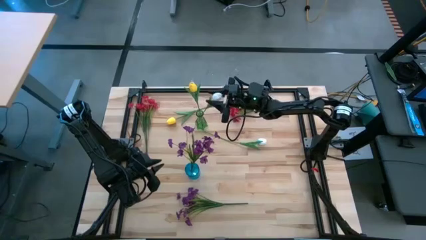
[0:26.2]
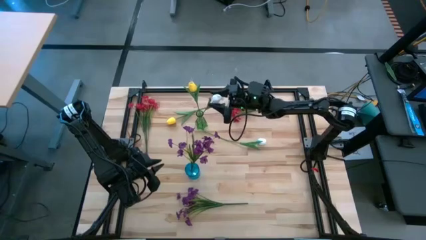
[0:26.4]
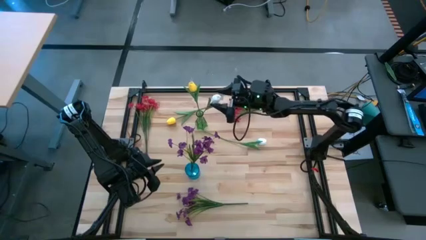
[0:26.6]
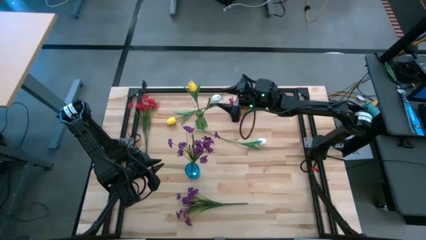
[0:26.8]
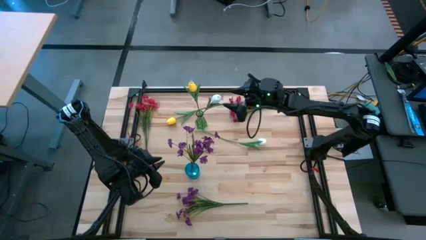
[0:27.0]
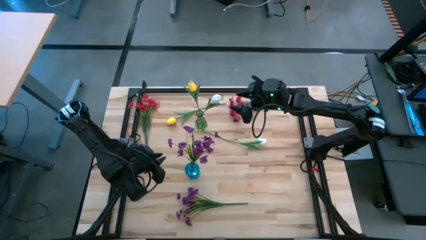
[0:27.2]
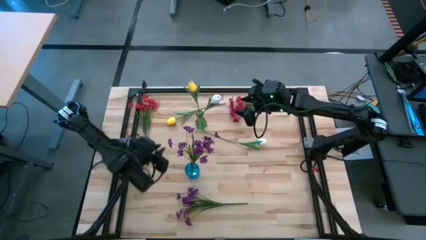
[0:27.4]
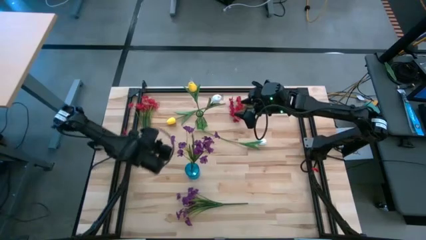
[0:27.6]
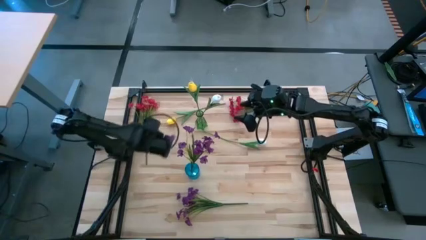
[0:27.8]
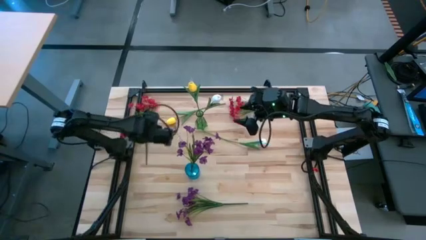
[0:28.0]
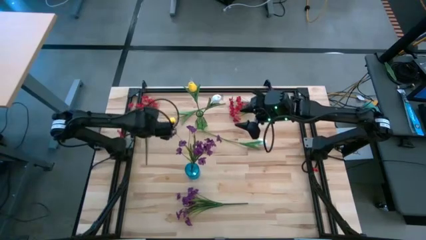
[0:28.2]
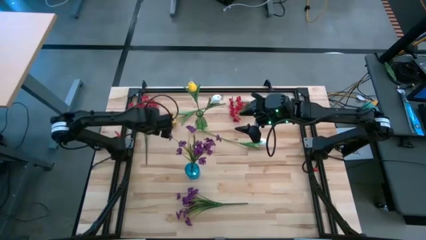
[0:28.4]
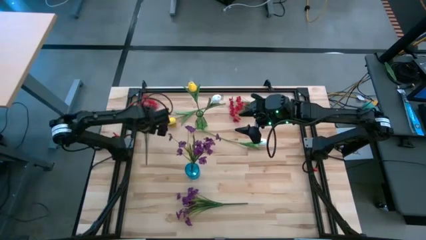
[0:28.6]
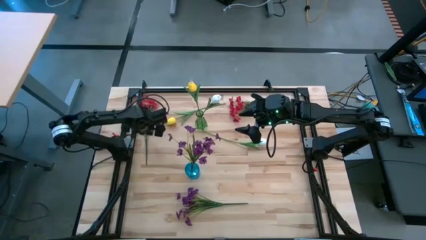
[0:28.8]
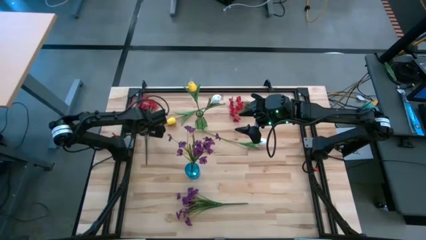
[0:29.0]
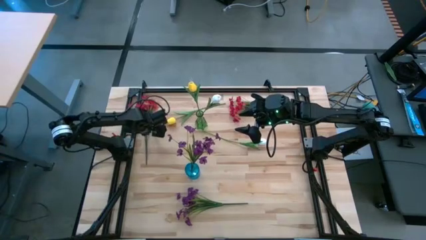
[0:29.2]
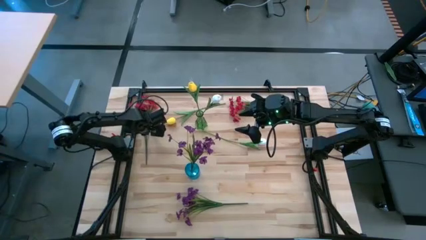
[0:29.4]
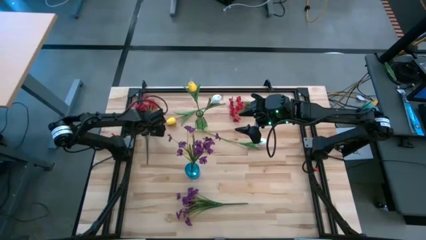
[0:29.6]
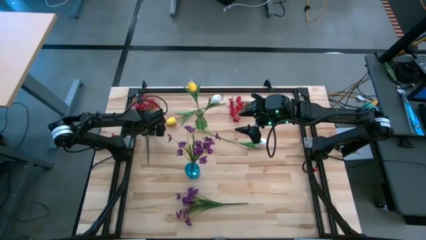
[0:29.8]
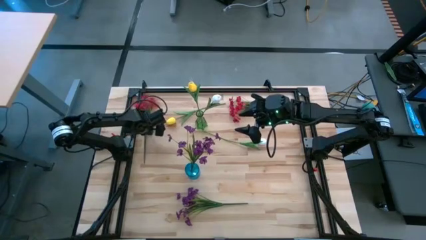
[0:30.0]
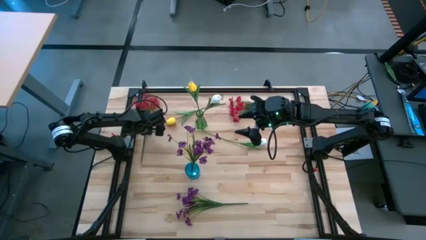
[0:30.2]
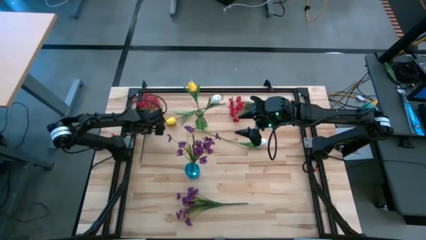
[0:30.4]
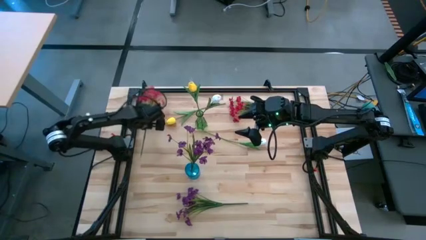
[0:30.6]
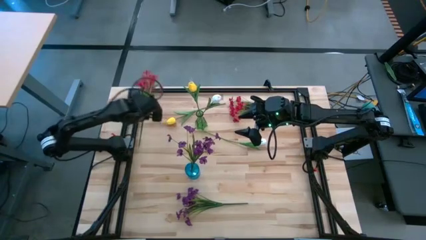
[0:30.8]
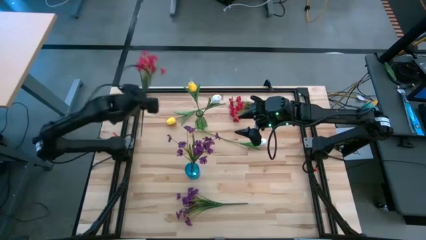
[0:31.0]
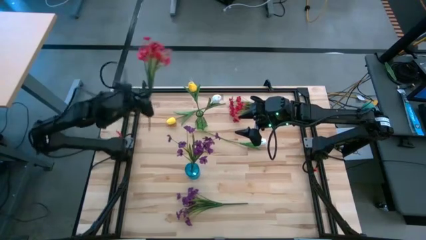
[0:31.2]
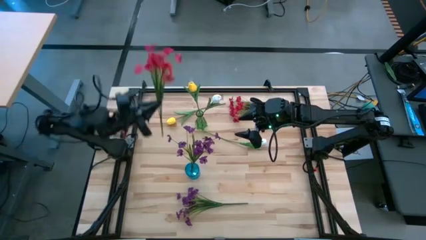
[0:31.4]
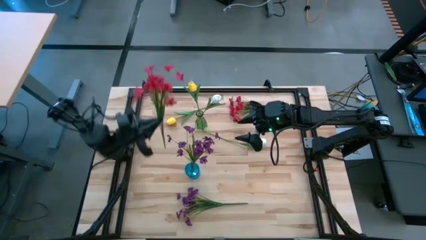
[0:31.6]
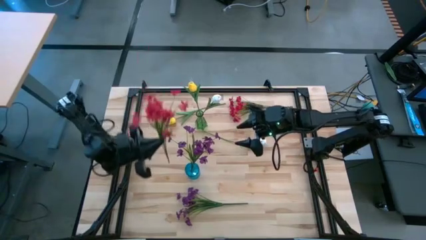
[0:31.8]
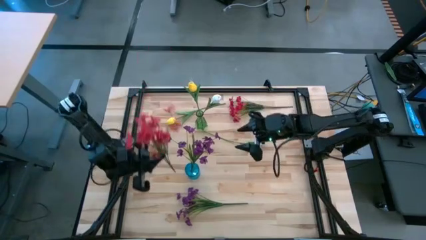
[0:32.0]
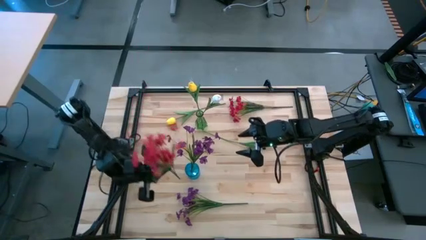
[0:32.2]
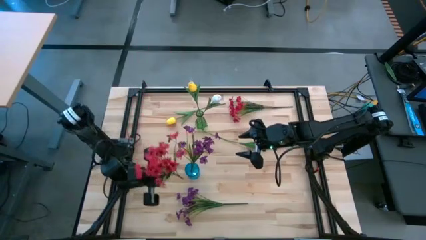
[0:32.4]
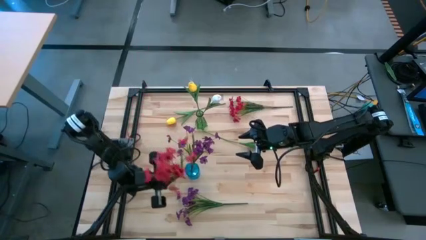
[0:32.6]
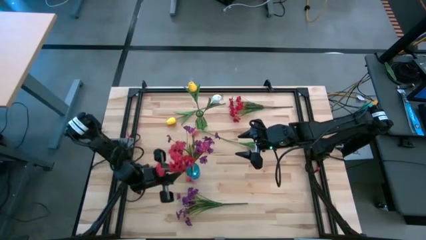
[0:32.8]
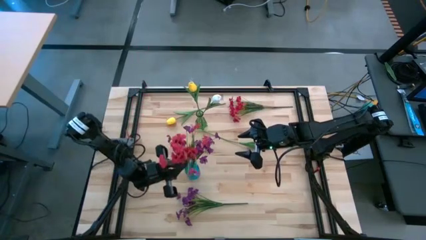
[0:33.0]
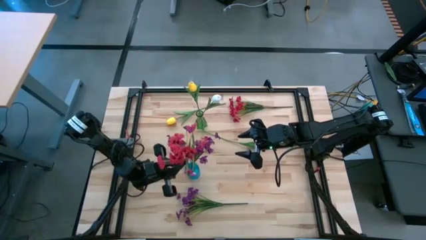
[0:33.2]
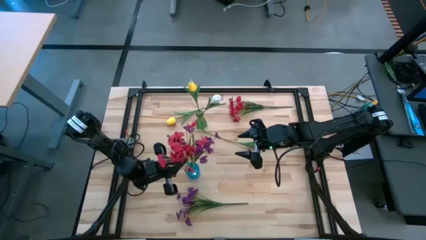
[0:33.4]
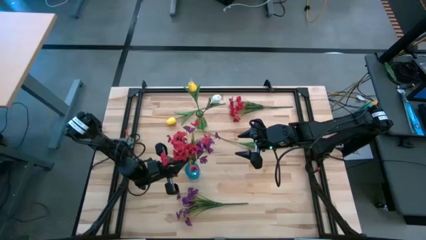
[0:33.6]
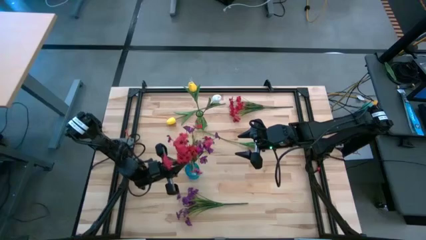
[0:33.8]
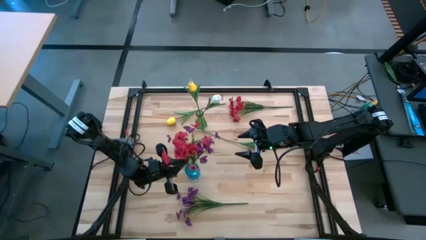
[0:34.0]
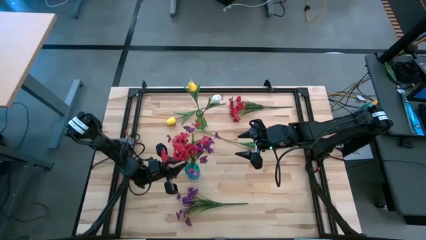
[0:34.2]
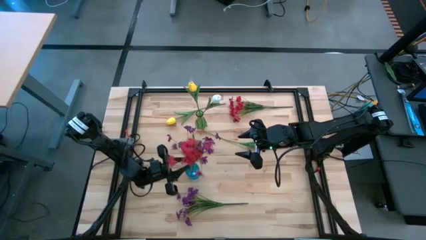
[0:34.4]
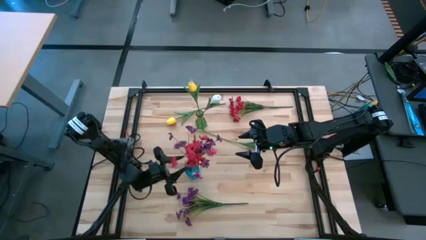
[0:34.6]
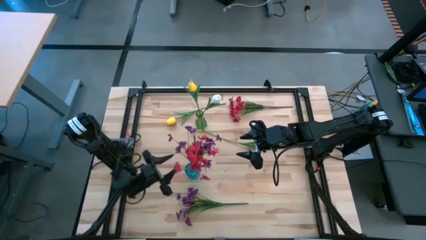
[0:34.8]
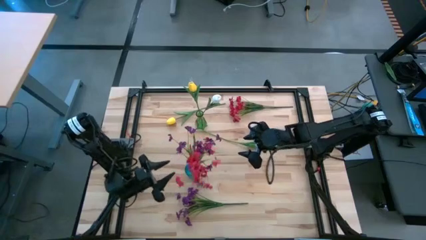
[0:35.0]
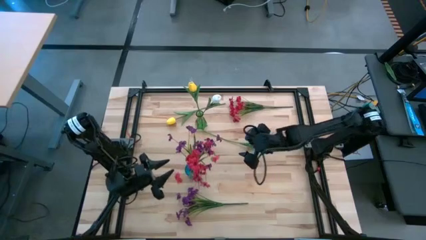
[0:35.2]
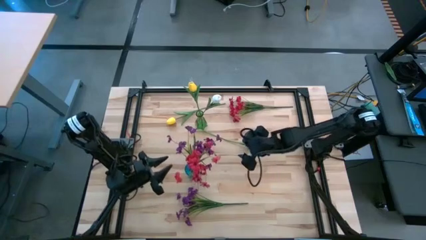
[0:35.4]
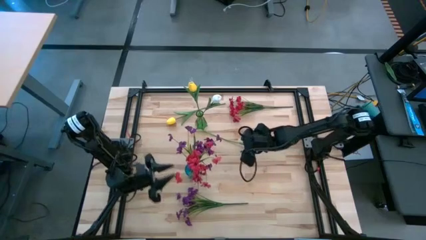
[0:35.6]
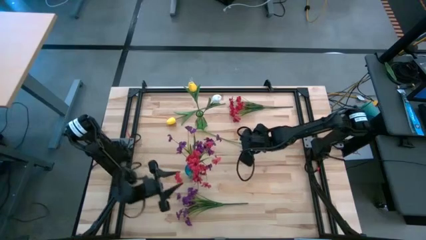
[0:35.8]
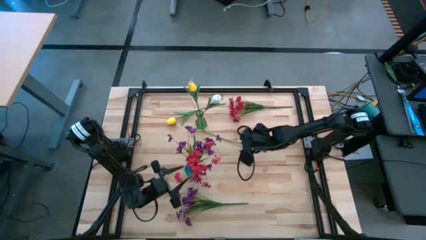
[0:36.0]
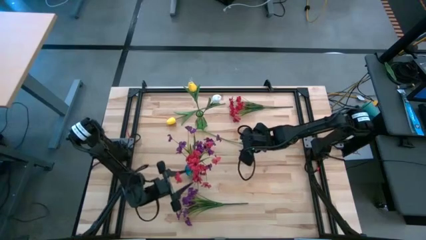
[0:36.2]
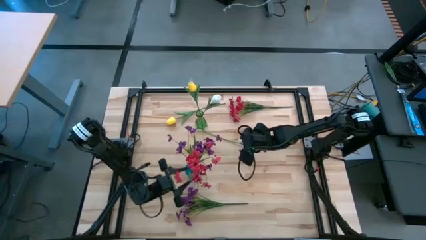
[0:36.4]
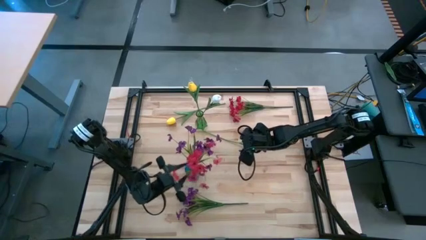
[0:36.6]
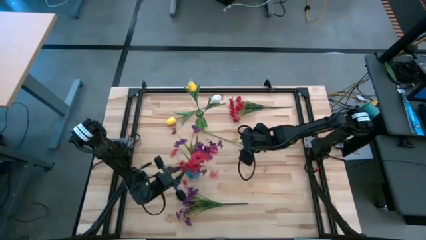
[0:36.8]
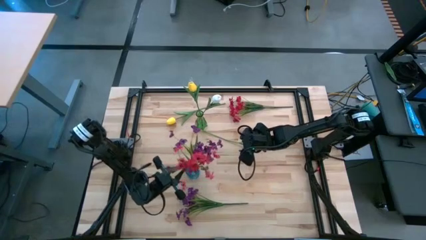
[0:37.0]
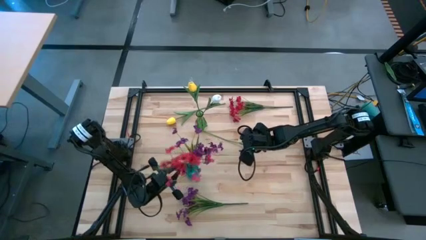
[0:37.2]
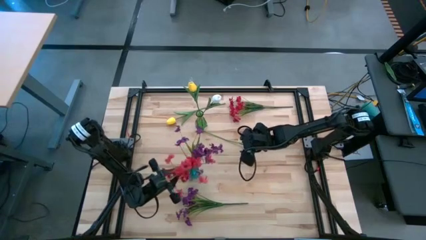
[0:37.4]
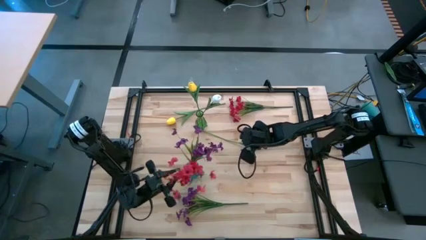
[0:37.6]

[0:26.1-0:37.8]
Task: Sort flowers into vase by color
Put the left red flowers into the blue vase
